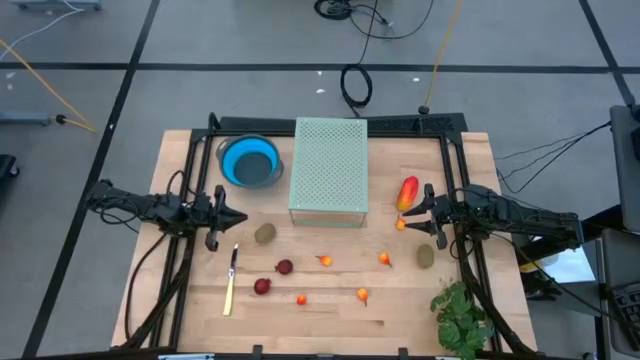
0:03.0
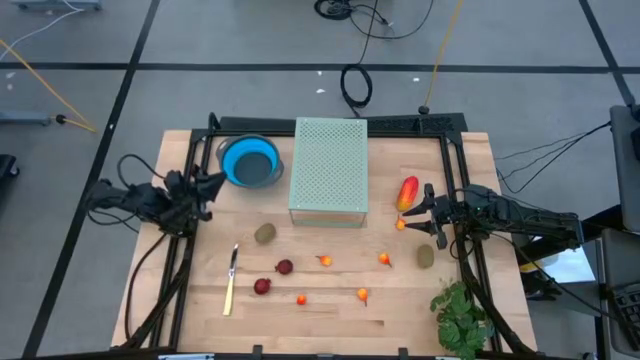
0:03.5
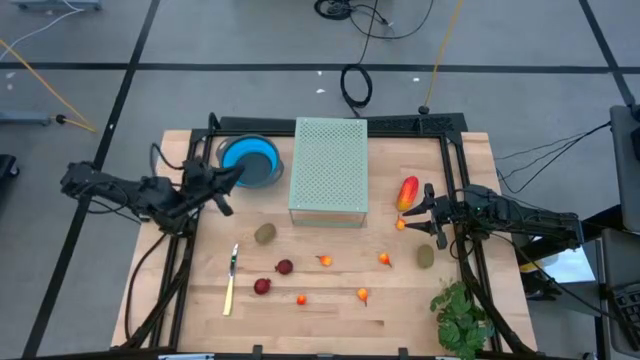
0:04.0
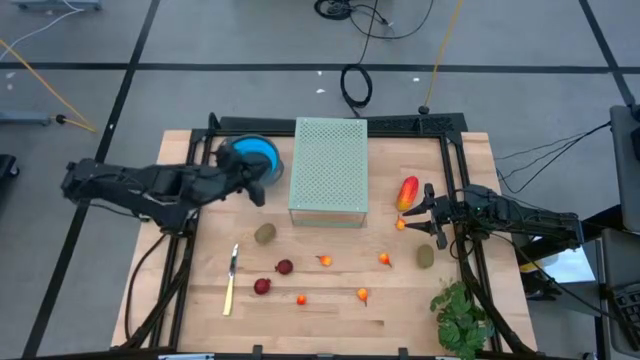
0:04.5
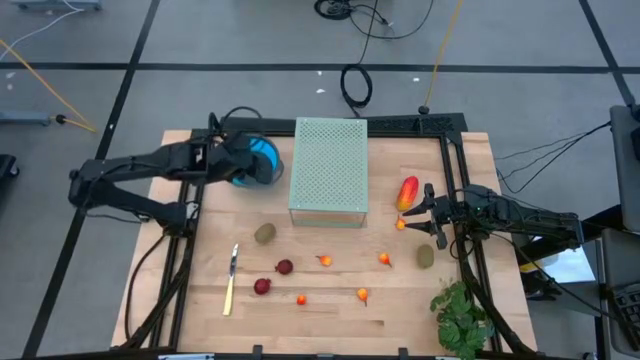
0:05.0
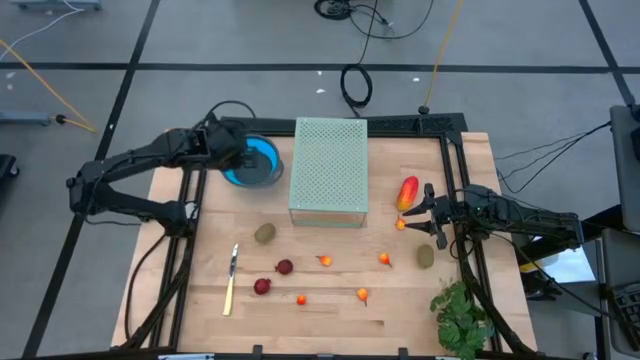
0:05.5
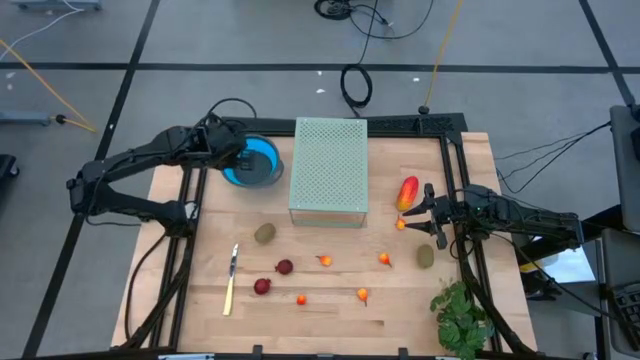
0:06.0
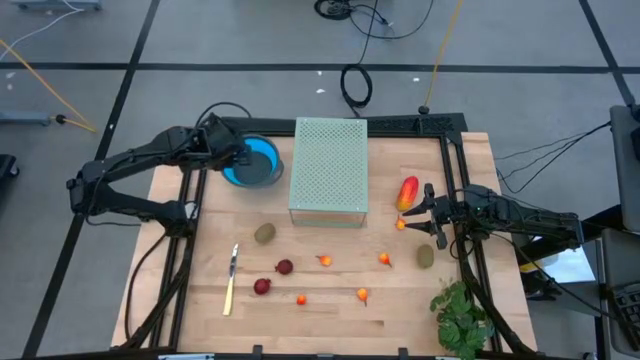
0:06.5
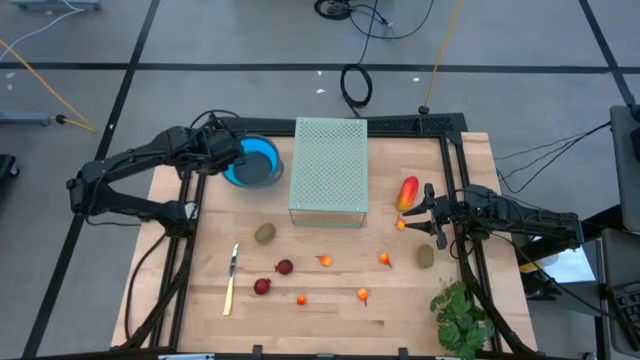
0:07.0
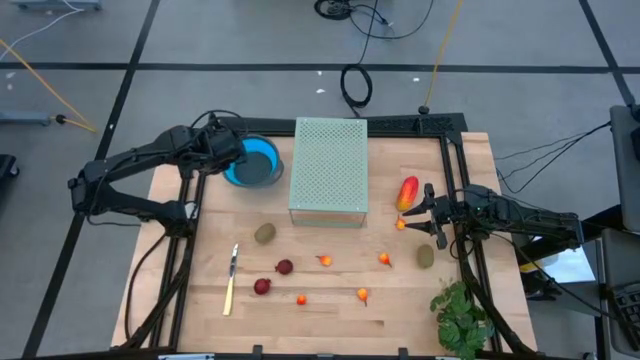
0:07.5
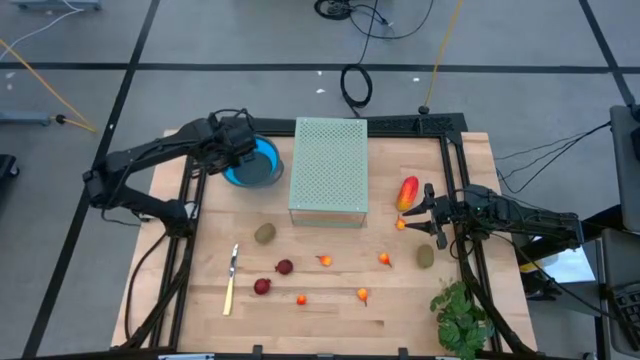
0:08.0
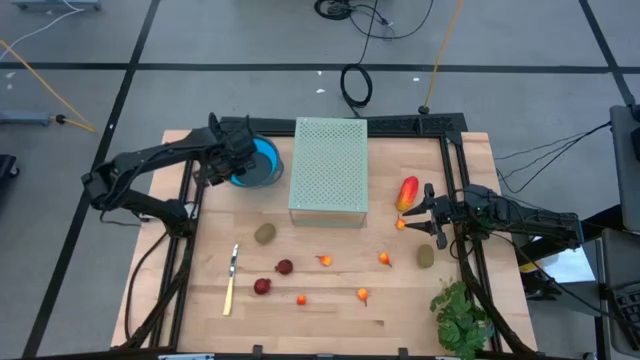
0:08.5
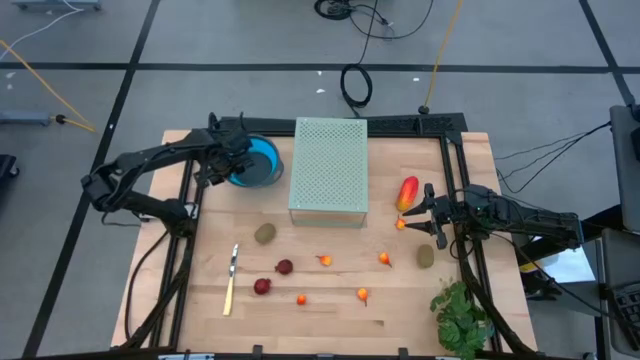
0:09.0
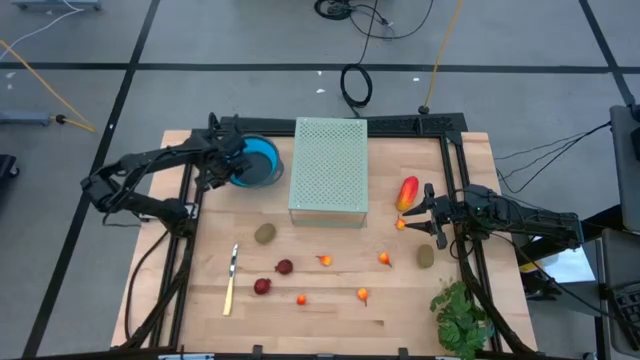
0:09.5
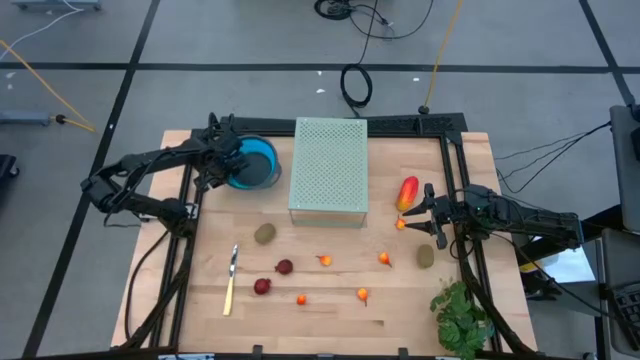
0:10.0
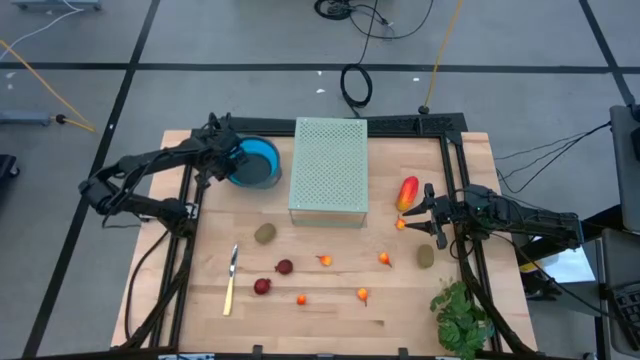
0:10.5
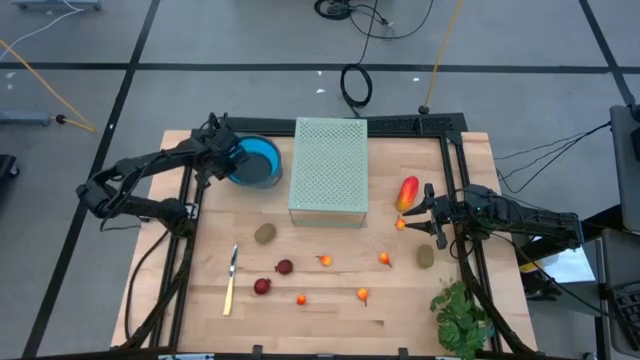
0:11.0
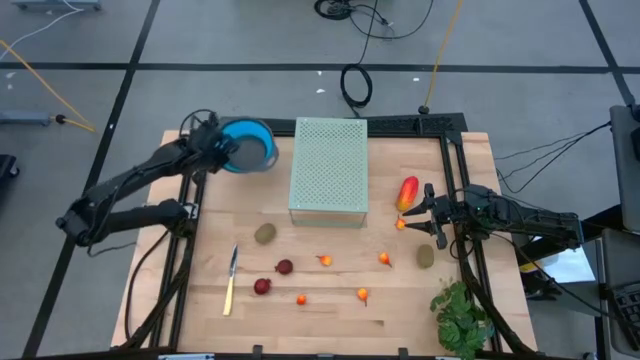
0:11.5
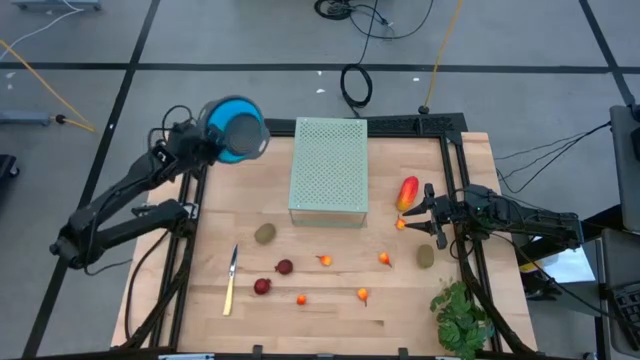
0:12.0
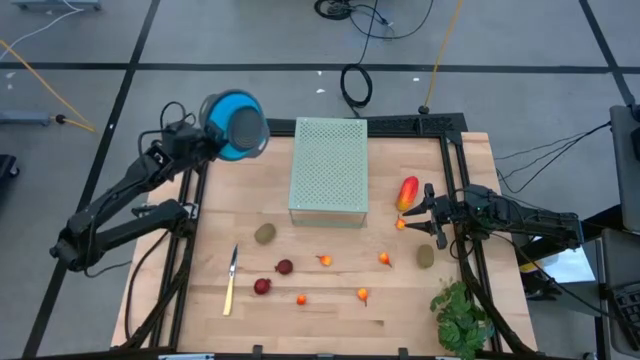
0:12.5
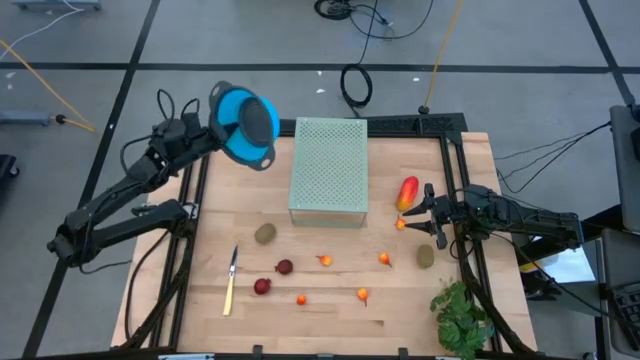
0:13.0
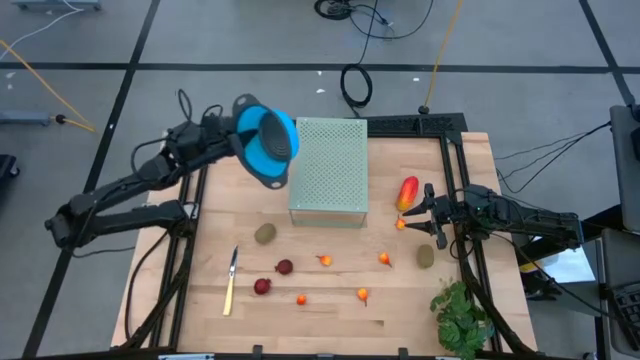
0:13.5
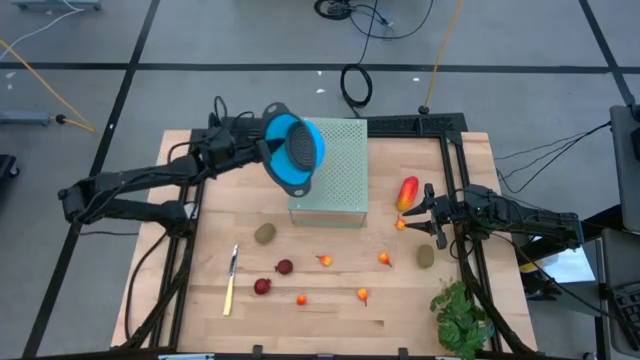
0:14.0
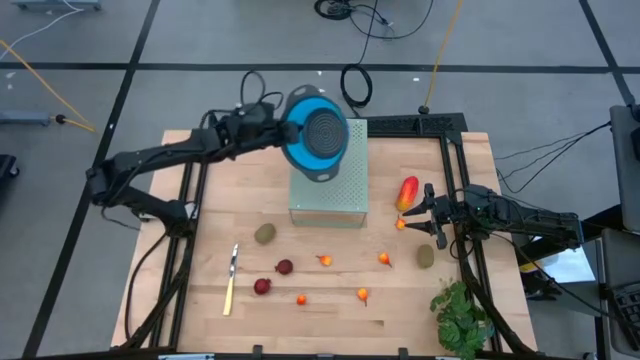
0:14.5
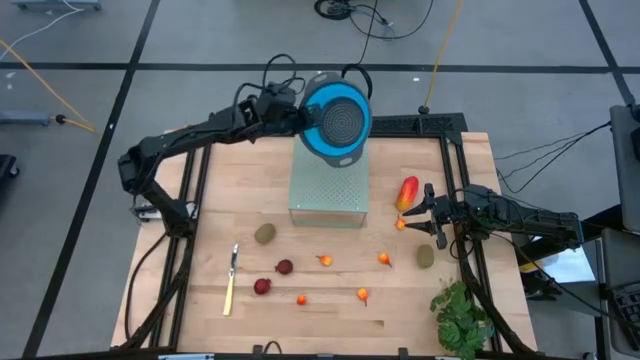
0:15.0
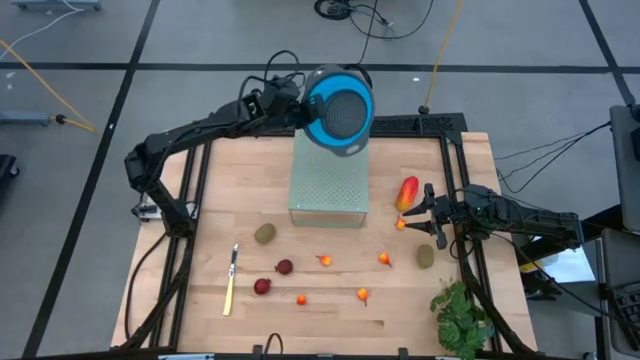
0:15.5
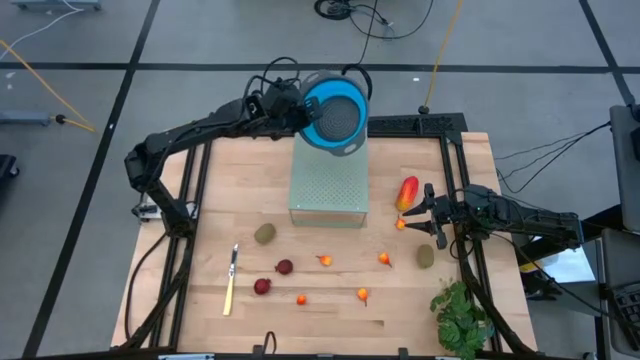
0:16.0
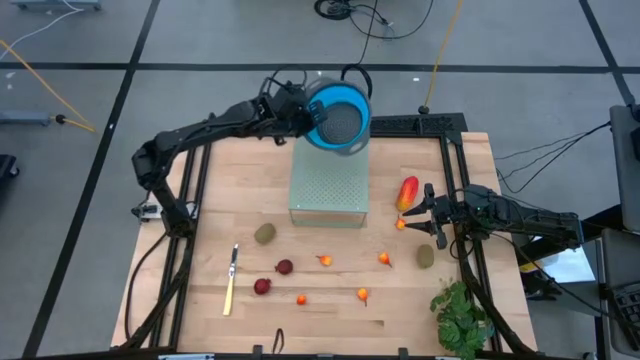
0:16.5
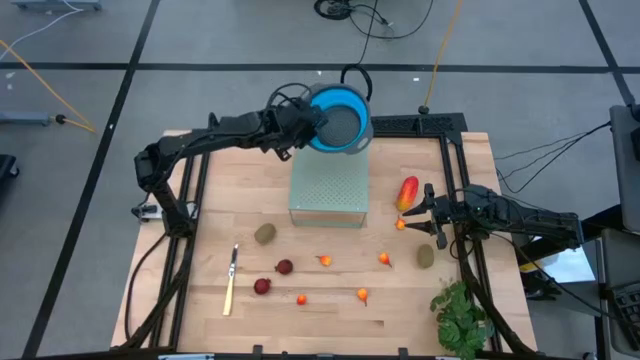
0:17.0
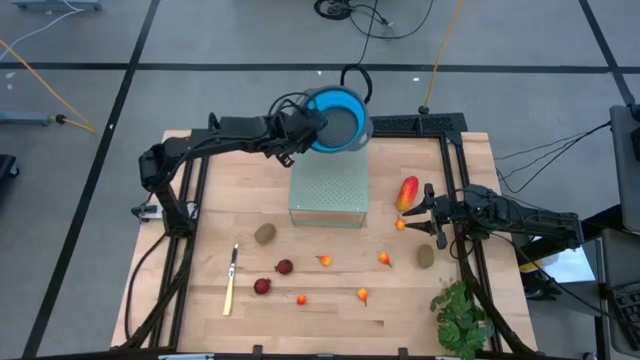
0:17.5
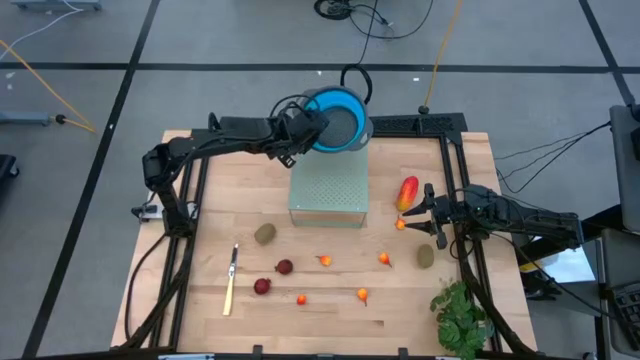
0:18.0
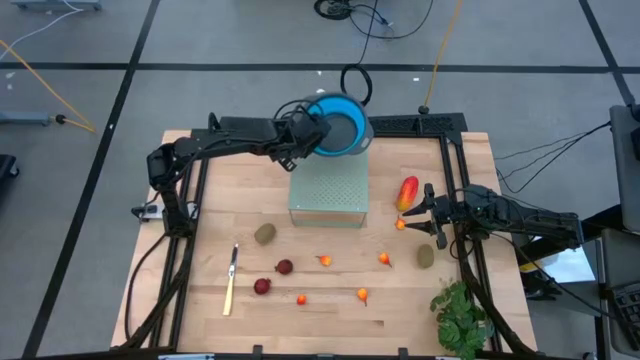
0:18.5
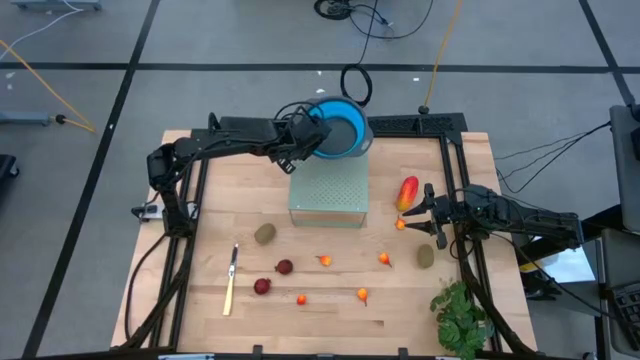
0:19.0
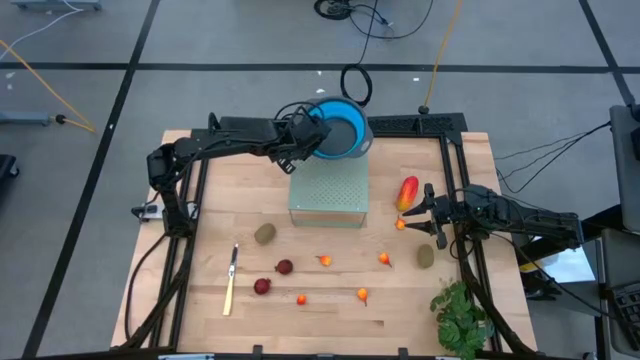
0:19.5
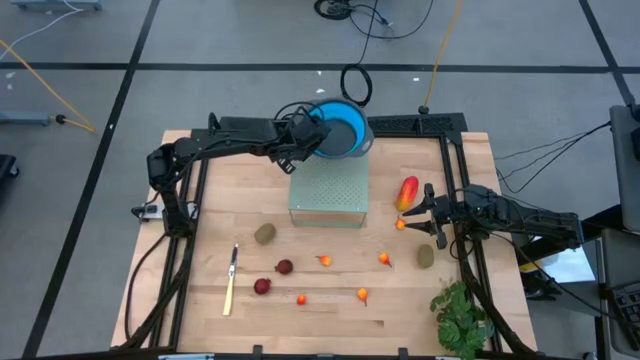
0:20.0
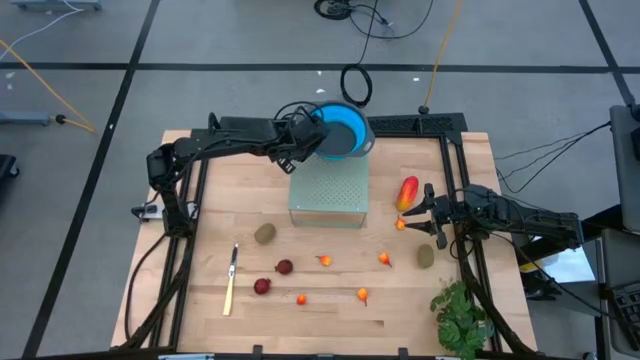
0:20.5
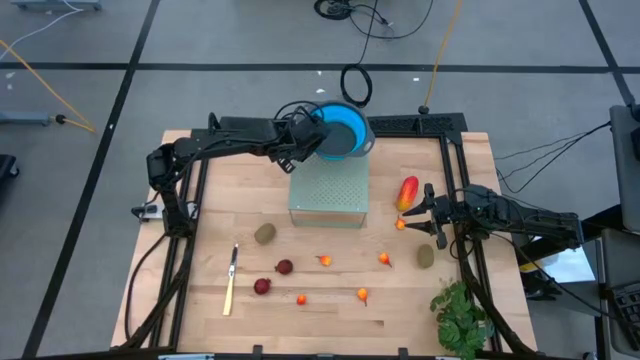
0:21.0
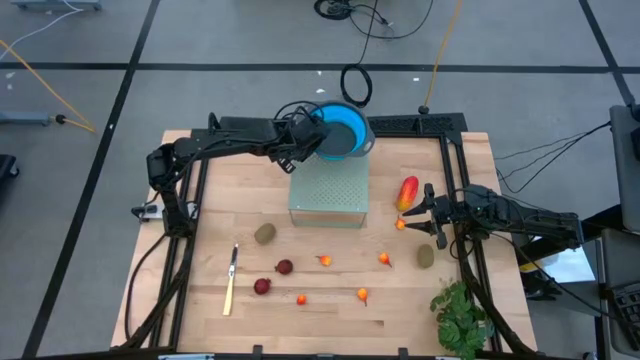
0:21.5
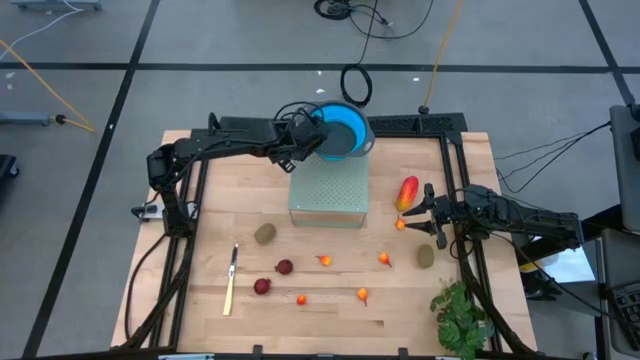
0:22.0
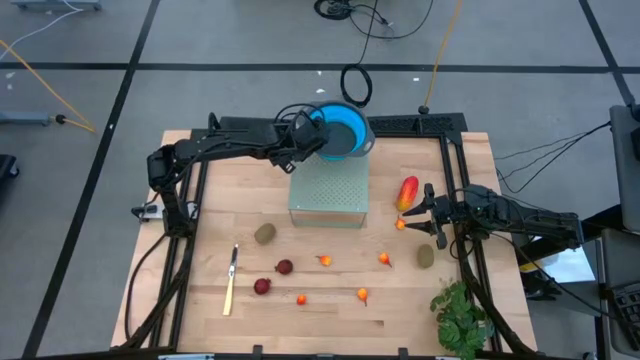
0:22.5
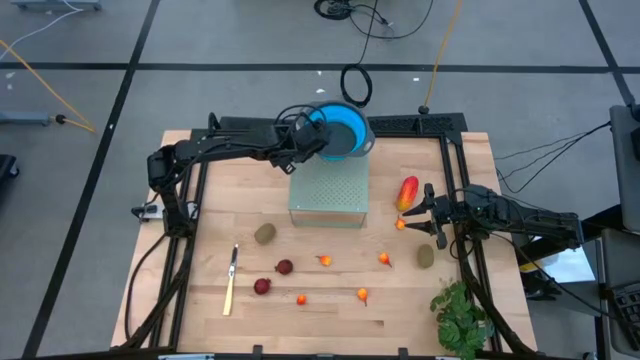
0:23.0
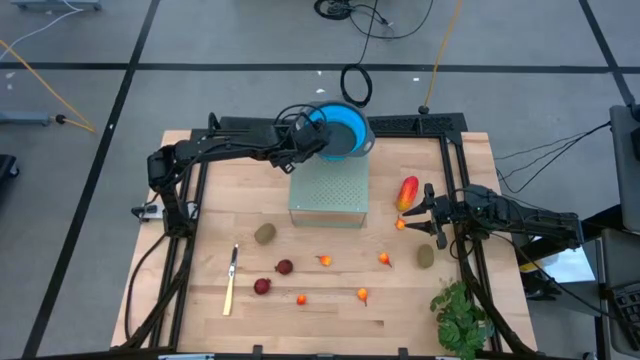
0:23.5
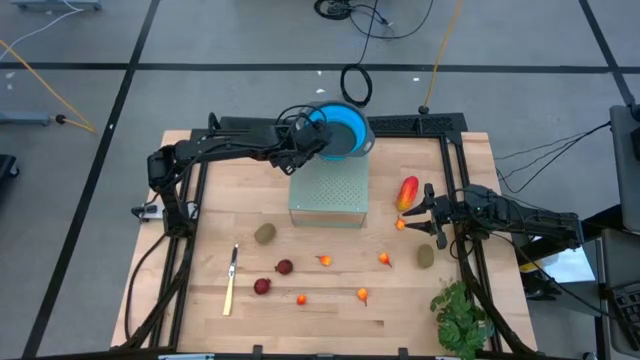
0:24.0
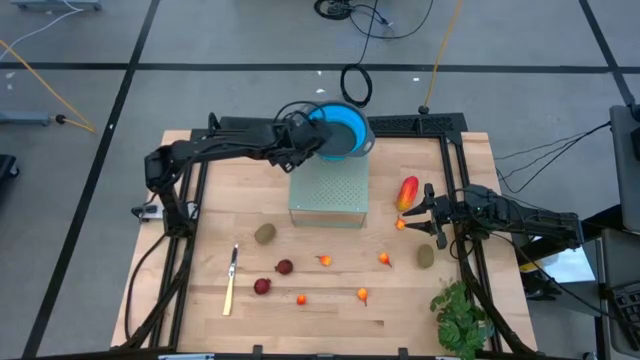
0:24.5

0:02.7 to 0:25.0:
Task: Pick & Place Fruit
Put the blue strainer bowl on the shelf
